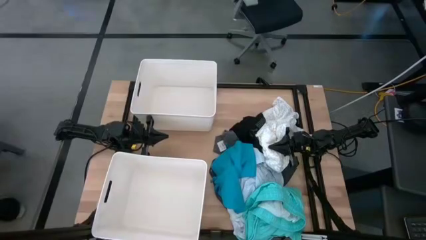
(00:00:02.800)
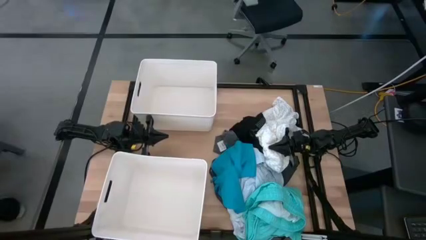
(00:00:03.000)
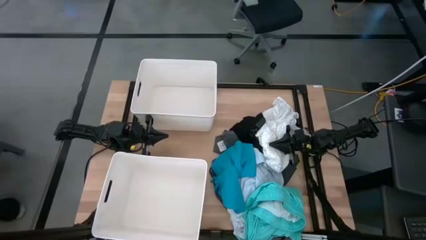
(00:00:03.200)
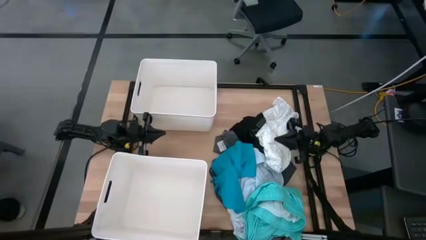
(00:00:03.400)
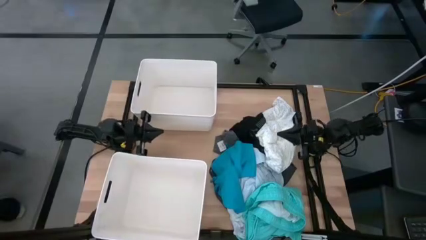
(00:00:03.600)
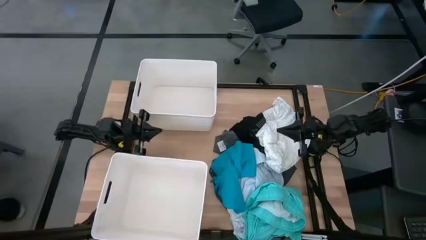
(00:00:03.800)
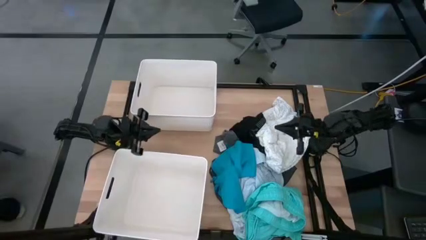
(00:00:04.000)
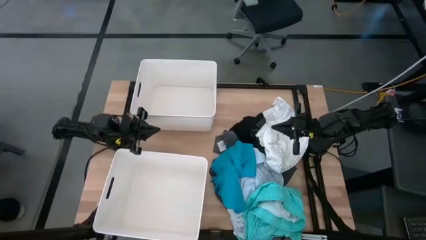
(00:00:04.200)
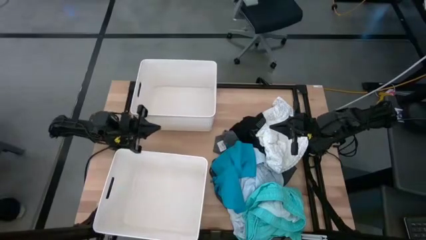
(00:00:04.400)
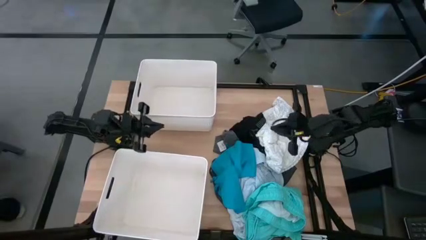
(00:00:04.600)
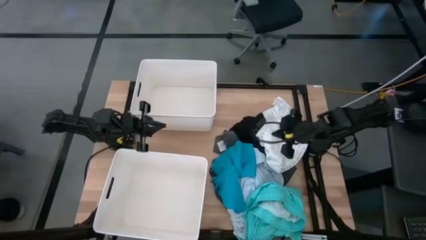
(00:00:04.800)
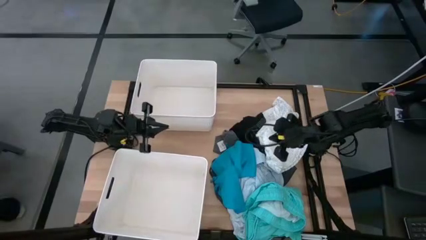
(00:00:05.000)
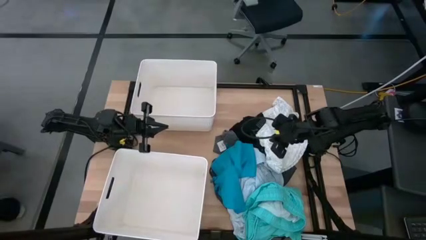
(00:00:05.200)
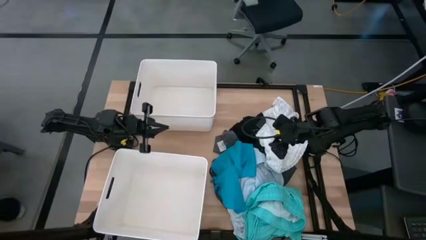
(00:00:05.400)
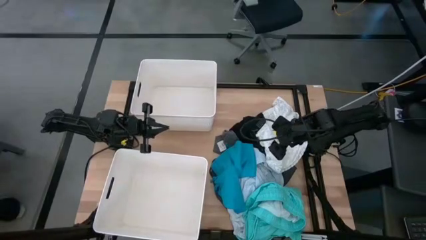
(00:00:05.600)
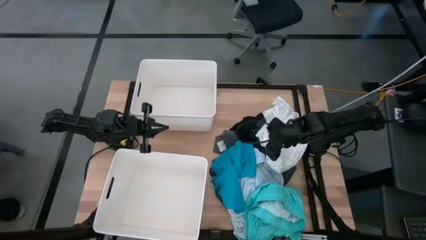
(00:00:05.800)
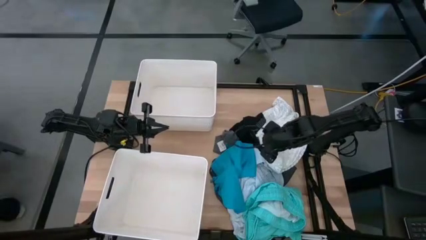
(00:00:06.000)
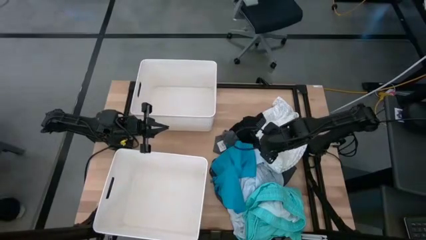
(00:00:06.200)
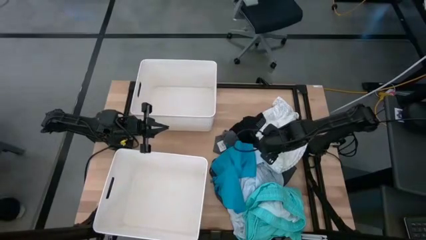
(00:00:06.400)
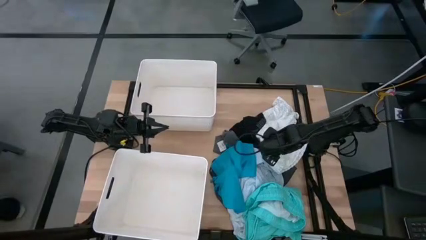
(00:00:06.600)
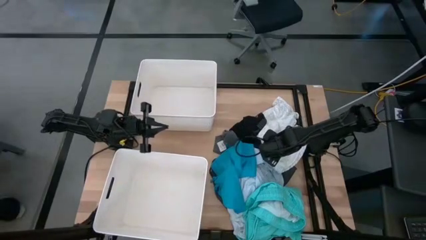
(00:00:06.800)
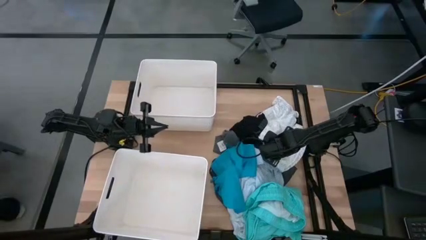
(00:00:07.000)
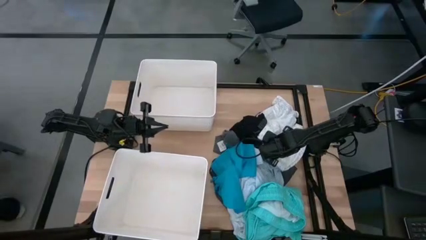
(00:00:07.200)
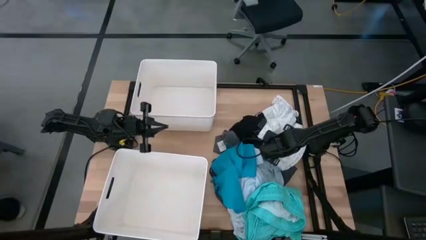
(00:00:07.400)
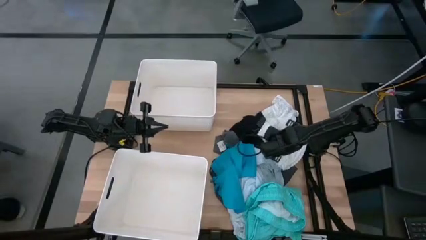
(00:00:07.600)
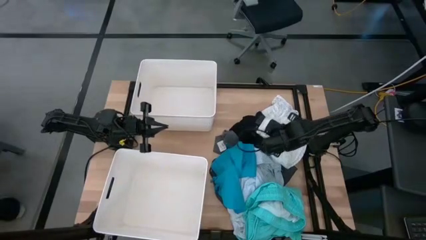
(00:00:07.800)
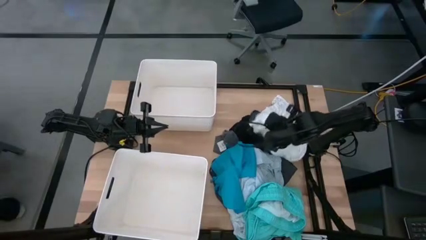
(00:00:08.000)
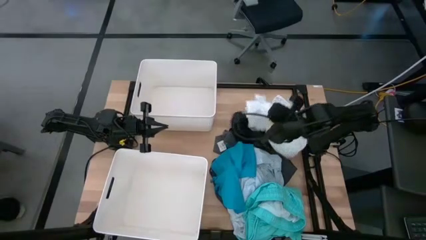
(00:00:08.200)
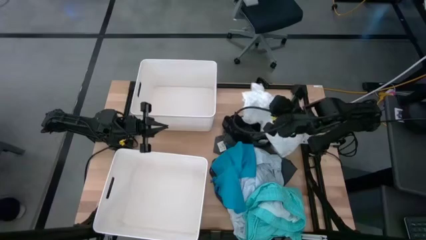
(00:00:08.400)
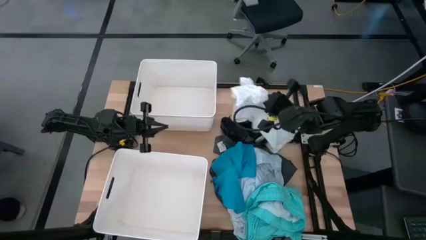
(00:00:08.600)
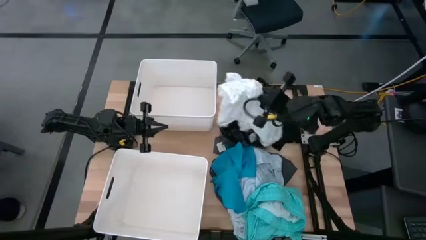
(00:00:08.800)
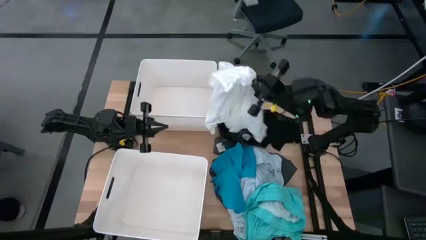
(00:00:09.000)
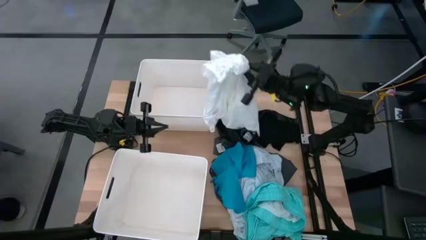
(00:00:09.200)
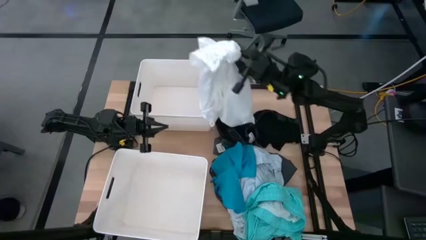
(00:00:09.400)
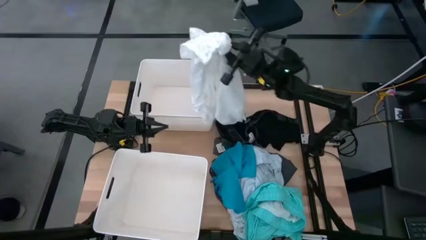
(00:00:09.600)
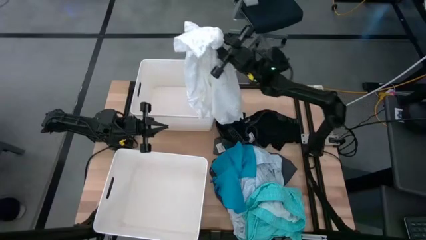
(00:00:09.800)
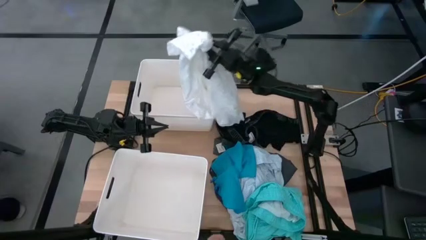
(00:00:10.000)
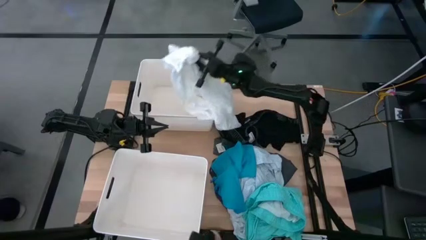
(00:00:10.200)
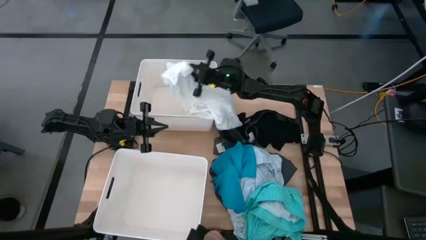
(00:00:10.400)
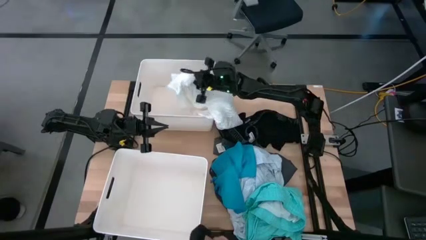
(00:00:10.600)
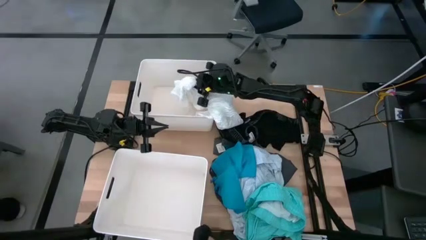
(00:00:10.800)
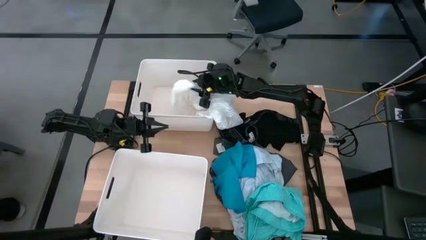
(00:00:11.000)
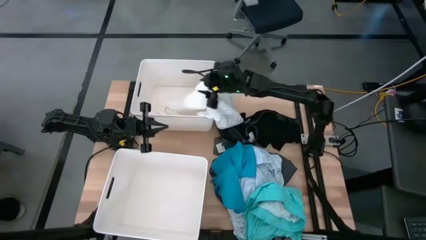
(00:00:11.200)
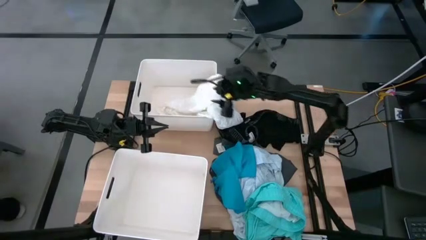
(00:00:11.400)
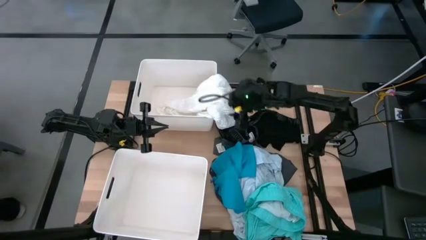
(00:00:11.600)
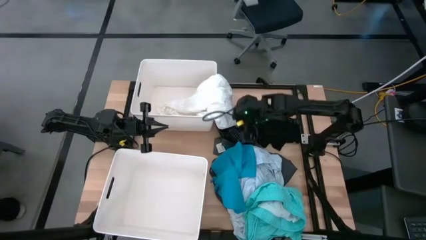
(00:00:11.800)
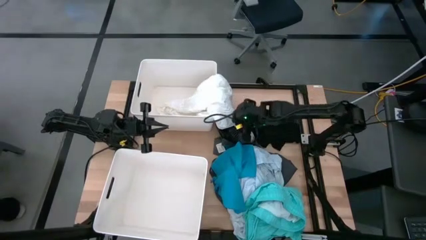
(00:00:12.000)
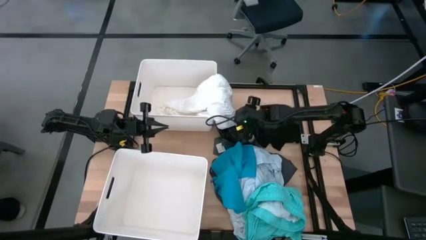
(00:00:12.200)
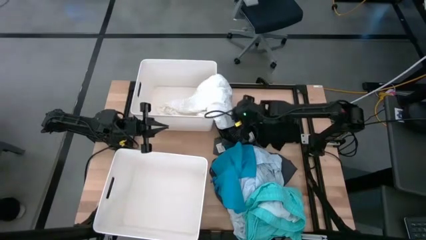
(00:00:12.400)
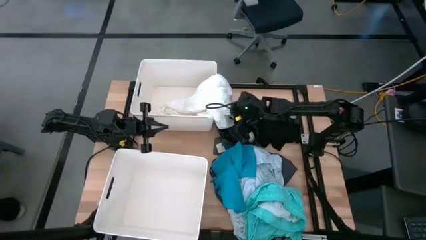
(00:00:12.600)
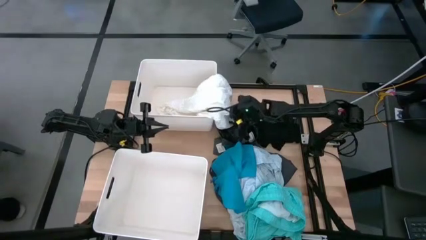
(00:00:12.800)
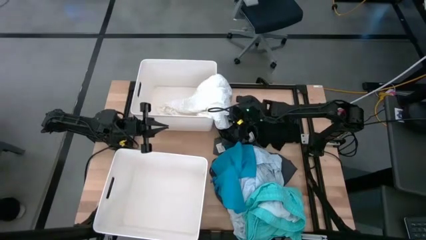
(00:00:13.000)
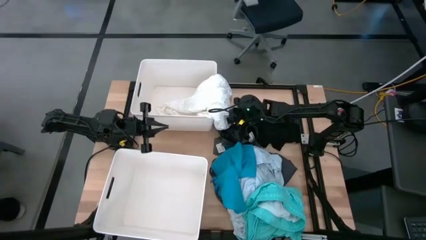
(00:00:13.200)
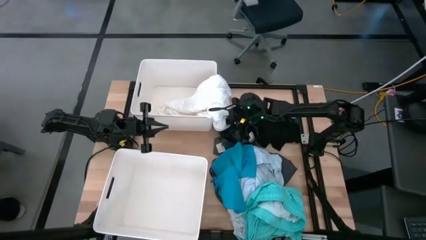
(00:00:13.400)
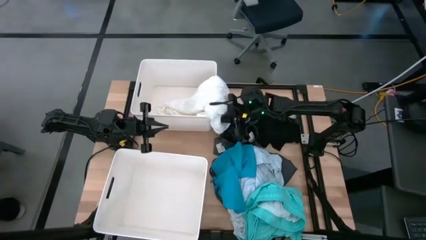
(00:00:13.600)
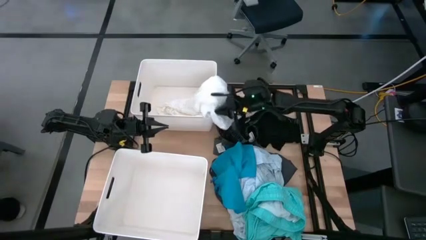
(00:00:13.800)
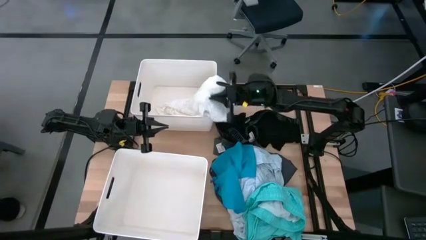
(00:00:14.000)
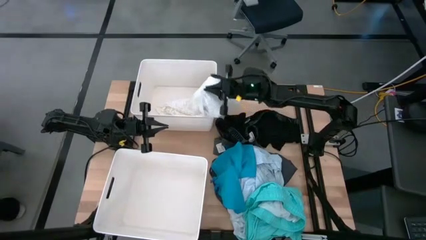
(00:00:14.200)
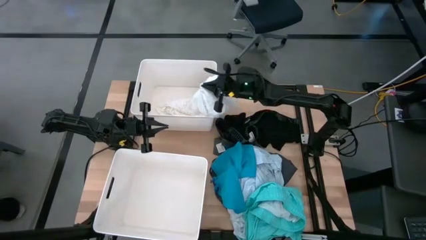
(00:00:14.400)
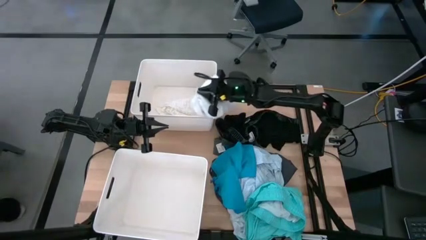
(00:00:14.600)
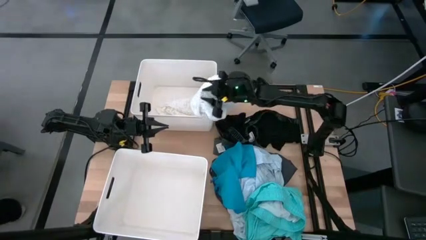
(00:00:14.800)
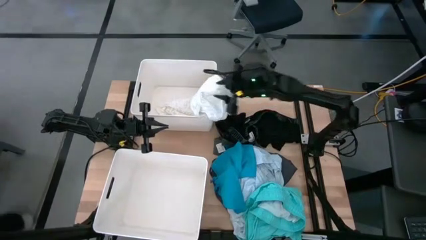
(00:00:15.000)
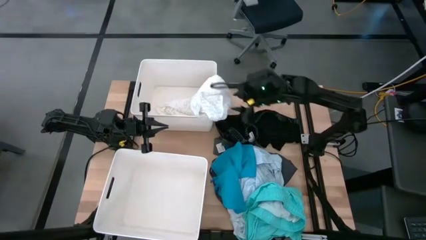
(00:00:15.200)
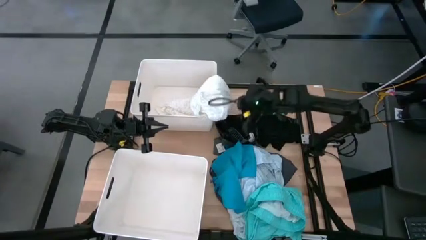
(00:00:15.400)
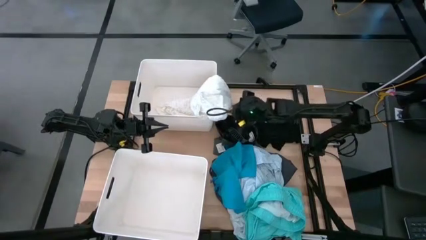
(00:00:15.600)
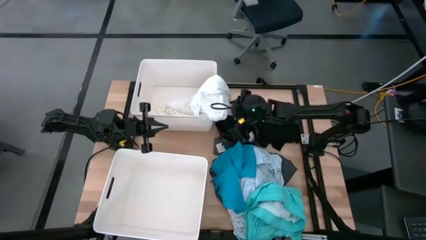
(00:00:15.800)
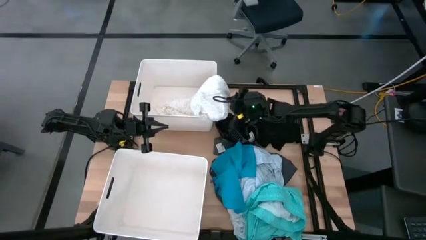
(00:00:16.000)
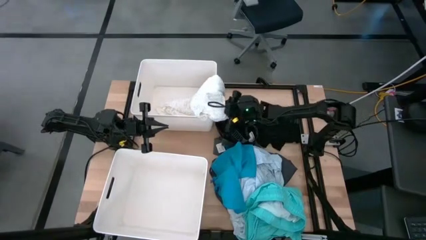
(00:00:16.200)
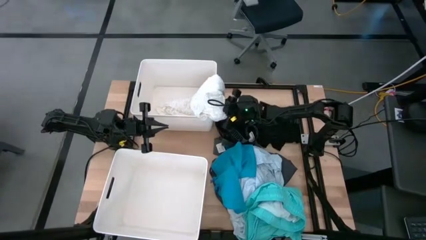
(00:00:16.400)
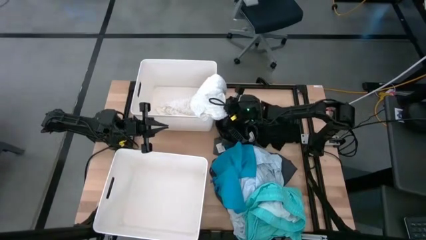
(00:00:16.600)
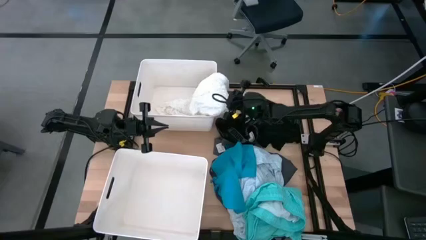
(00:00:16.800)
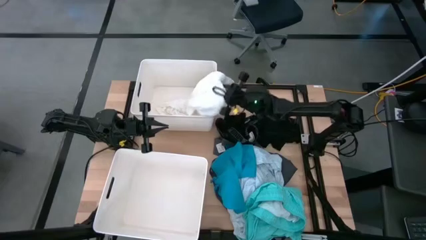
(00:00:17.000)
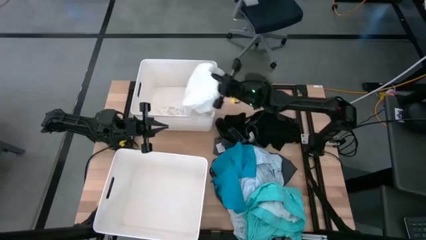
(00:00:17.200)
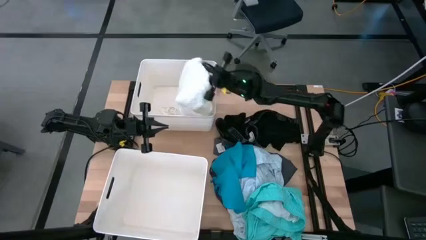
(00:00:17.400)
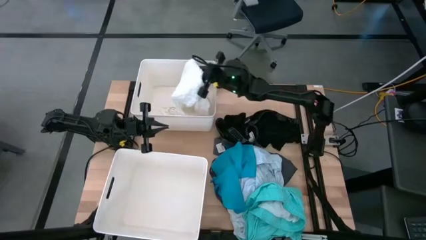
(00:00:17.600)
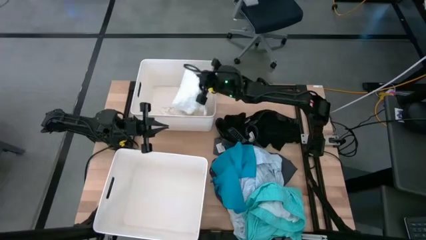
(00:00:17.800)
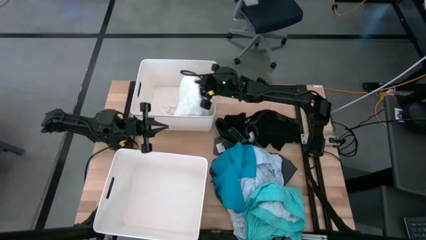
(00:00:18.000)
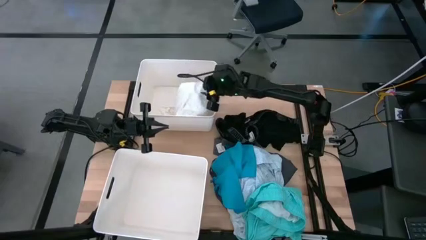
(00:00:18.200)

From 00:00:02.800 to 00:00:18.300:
Task: Sort clothes
Put the white dress into the top laundry organizer
